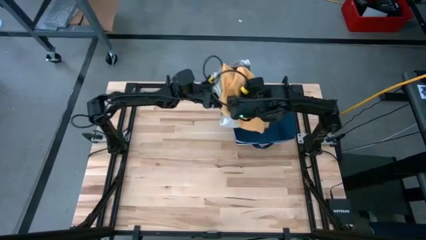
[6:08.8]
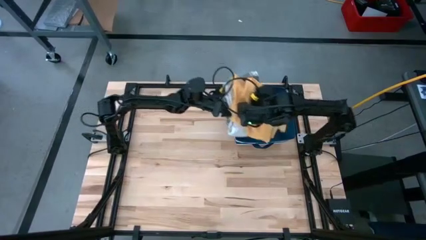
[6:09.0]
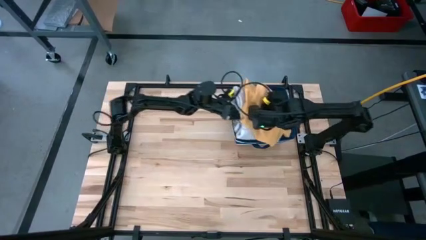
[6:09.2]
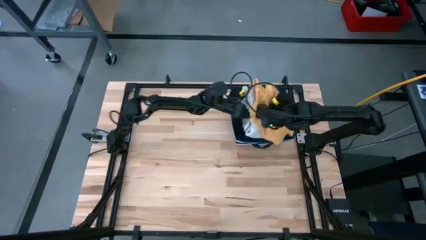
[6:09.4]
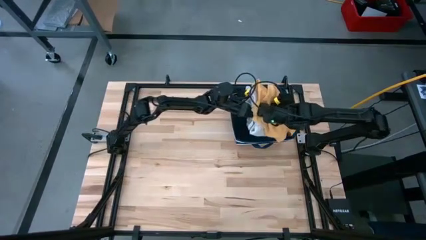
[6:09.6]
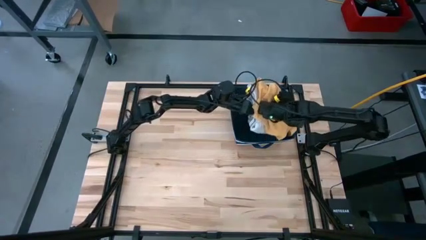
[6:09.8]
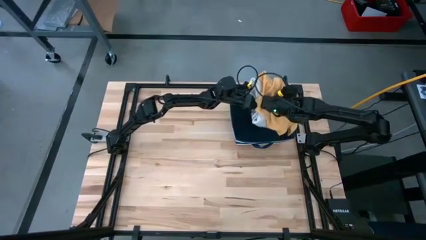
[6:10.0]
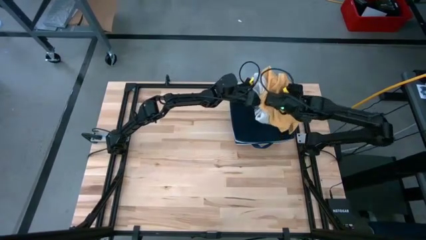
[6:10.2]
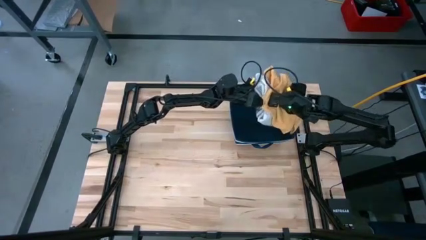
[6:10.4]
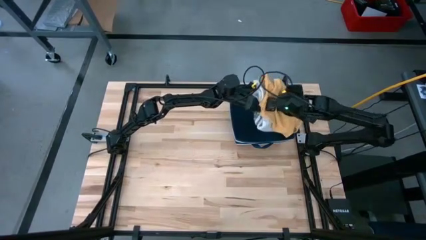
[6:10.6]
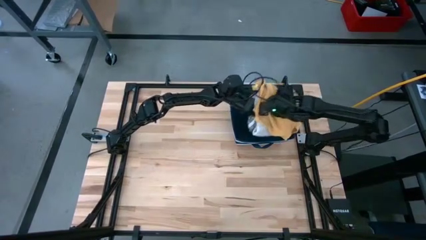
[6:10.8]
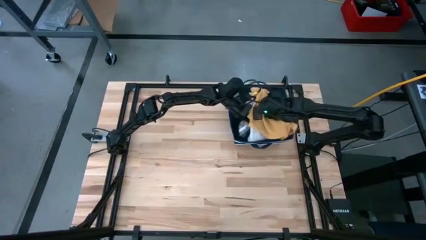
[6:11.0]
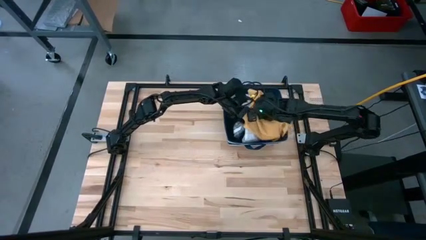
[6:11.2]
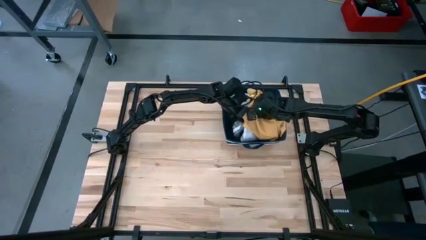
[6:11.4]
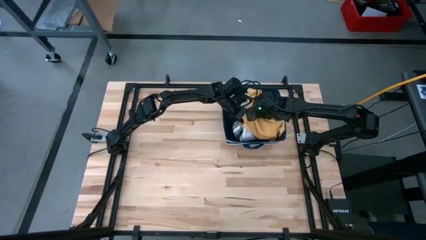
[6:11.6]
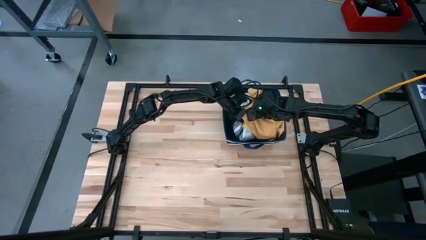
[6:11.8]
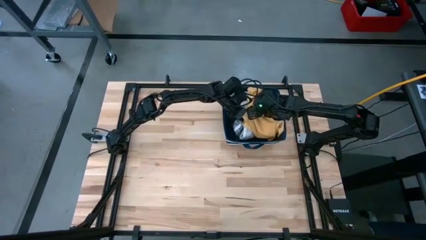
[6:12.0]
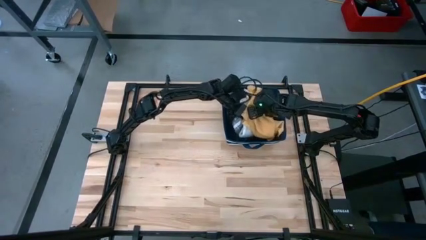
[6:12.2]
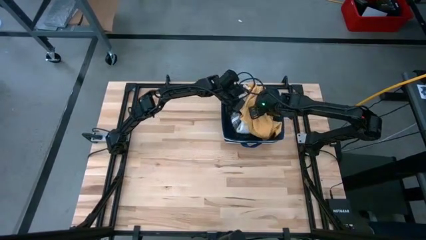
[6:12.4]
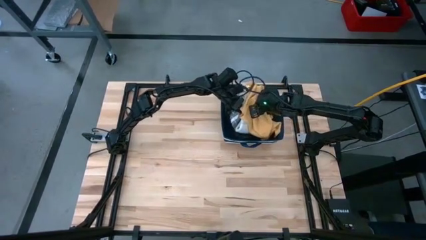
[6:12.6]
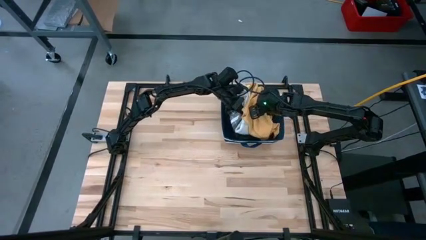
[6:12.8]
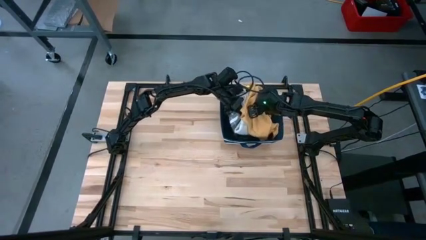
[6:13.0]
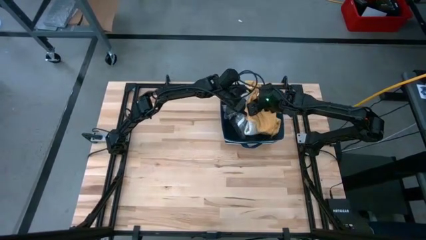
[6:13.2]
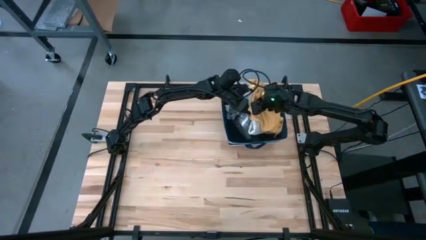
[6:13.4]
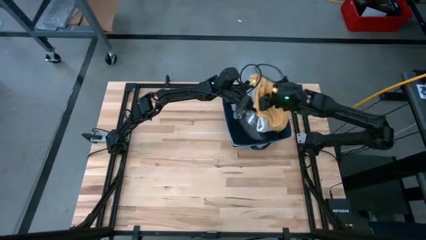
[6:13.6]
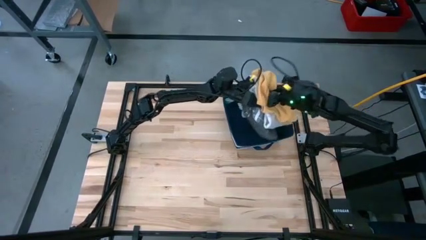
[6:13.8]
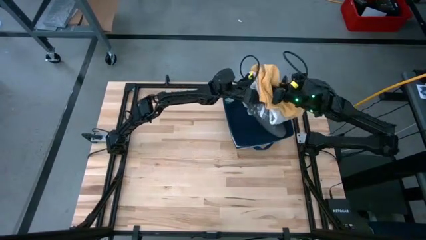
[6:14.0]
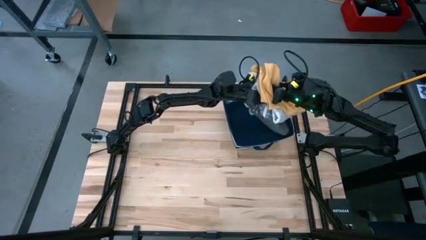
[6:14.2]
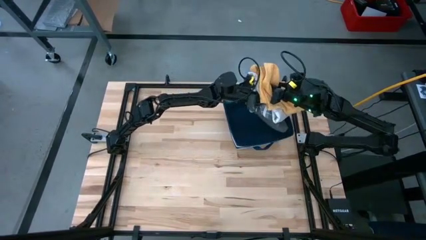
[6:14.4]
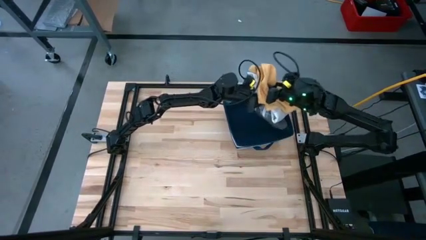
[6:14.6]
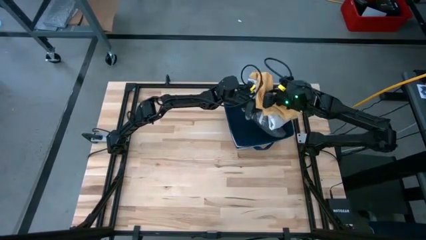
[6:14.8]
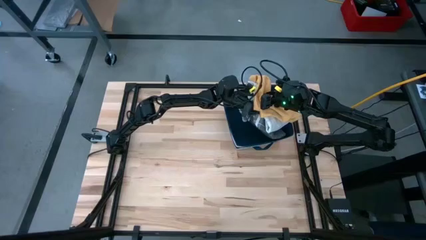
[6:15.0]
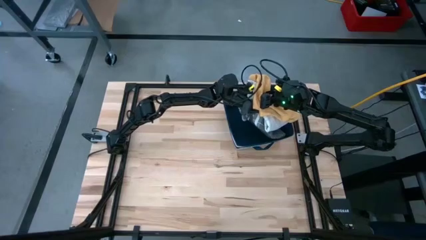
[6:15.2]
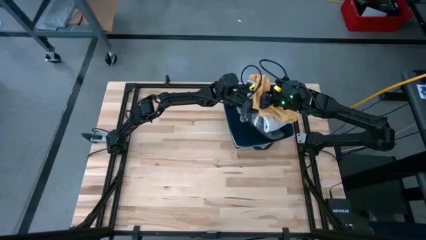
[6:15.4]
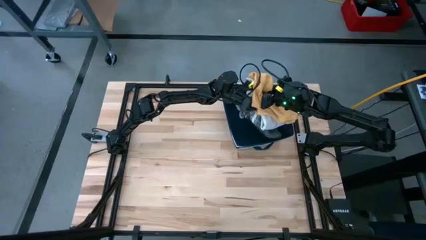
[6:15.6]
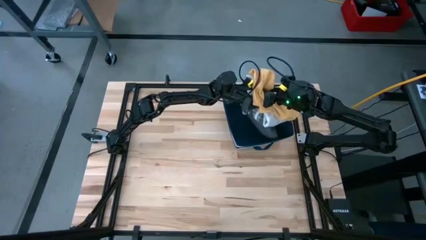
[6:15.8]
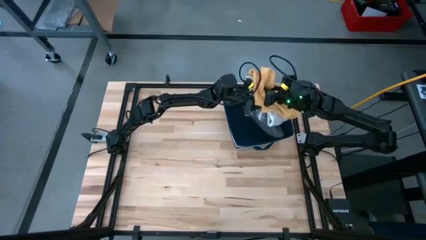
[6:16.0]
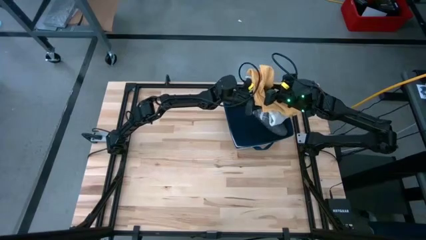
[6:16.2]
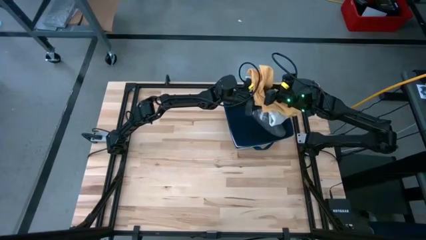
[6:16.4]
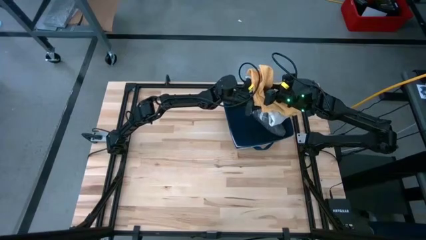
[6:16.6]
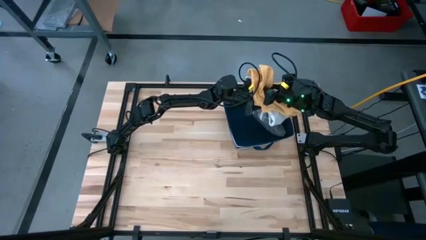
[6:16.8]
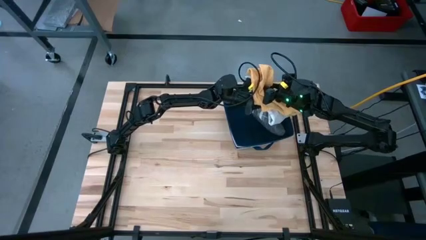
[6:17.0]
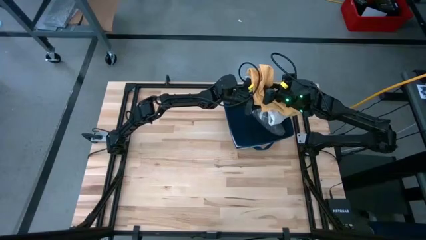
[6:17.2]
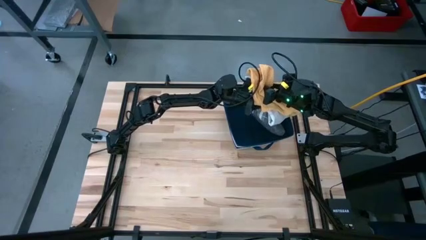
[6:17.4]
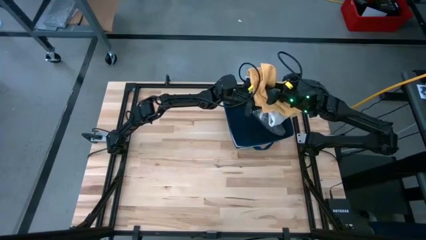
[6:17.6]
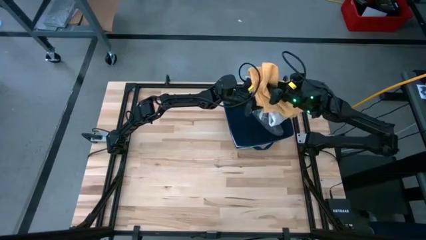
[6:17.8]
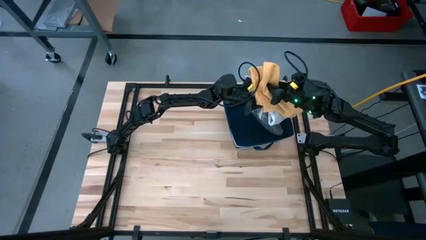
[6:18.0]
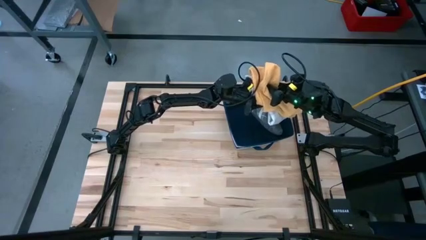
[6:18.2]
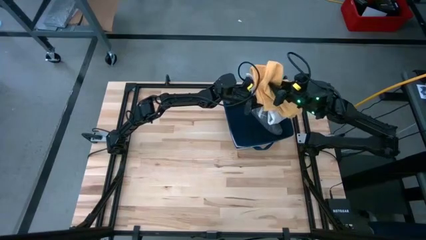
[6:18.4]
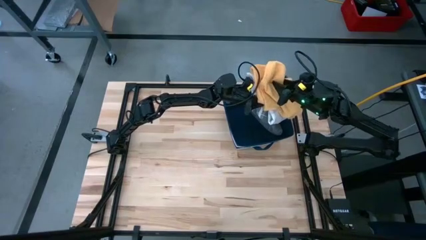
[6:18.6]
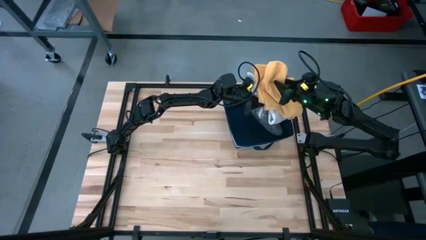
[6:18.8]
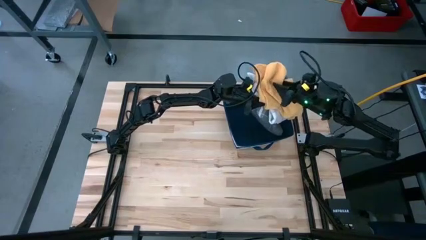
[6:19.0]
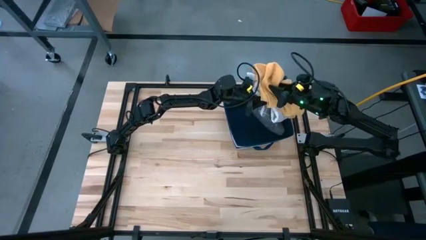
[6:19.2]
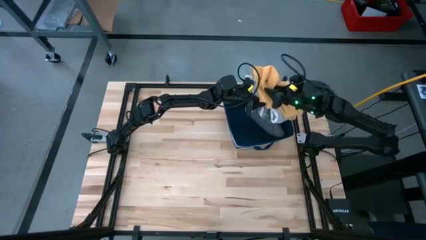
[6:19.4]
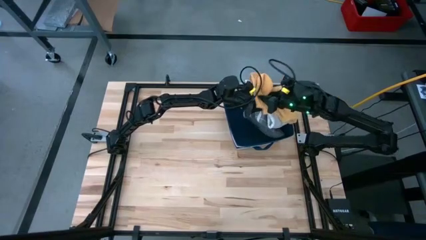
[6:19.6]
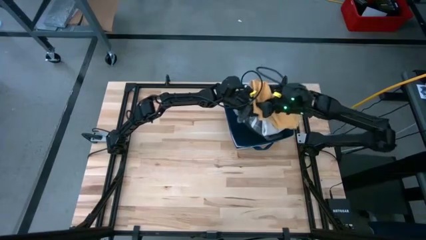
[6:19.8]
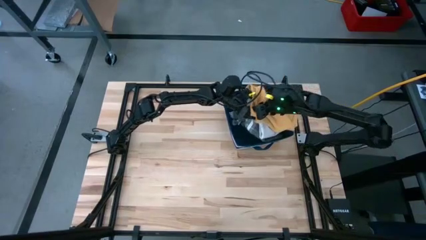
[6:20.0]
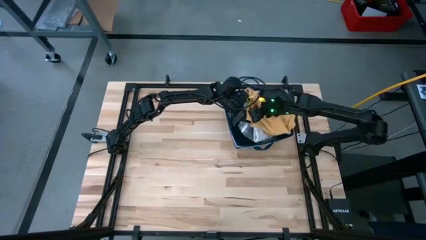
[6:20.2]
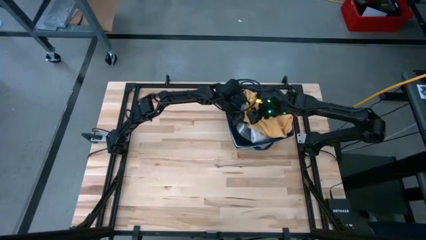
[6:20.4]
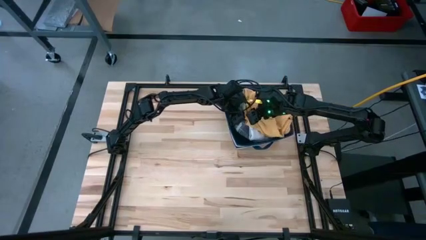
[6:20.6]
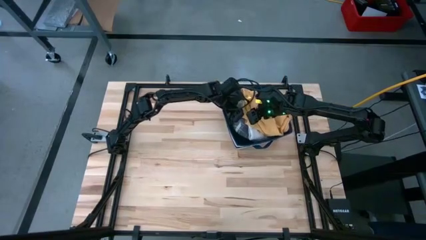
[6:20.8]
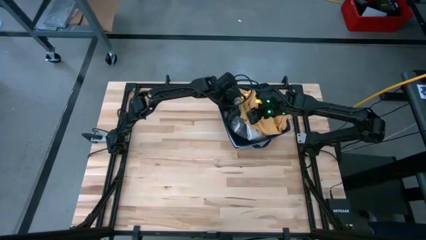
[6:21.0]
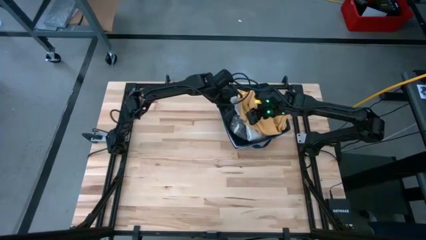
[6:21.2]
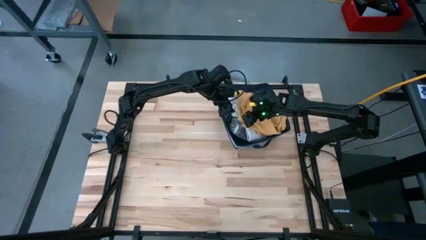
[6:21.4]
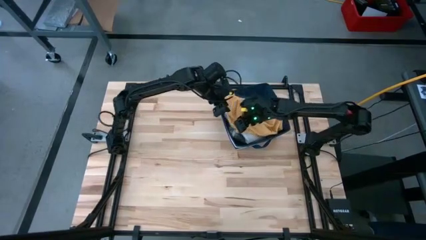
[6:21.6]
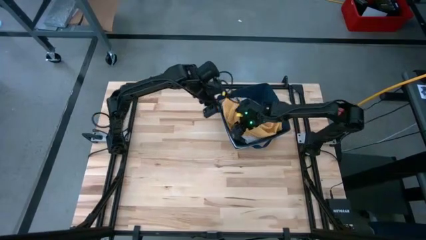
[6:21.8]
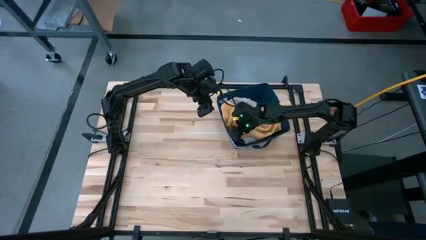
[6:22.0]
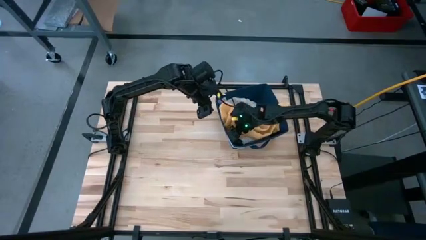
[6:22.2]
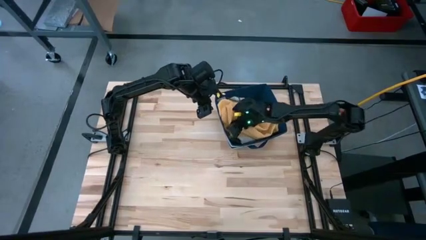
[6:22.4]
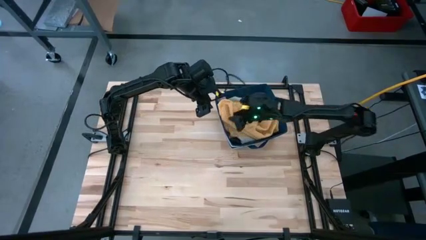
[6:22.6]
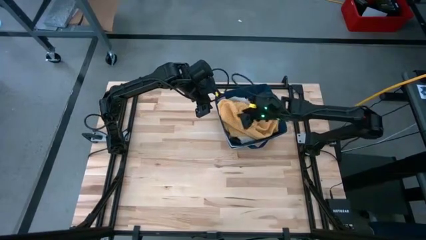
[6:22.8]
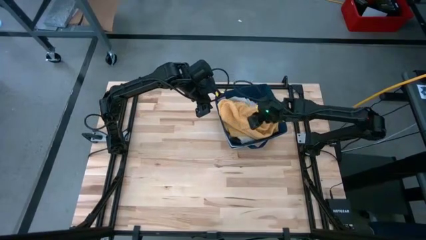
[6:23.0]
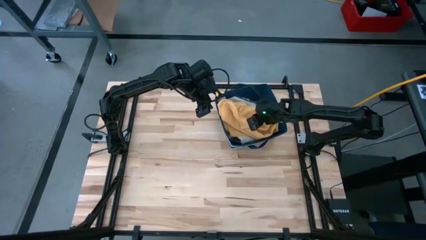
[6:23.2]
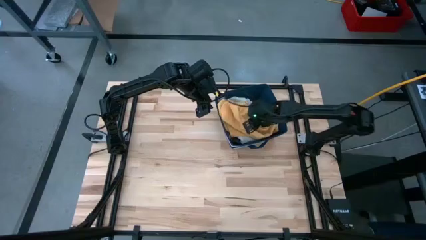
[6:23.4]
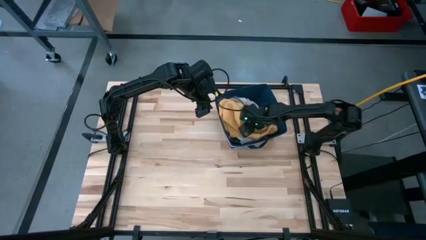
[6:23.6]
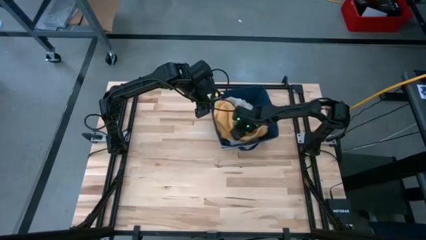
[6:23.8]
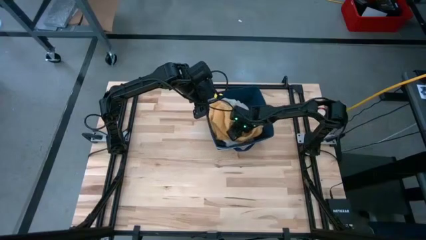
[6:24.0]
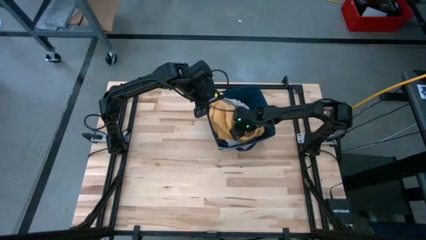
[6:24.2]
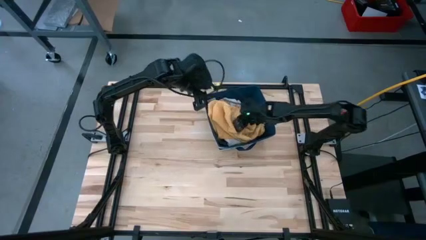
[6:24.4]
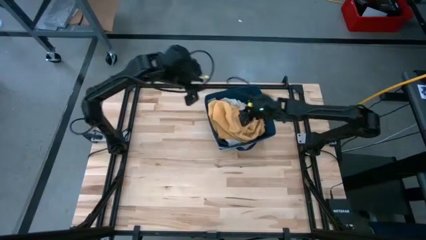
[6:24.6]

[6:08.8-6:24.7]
Task: Fold towel
Put the stacked folded towels into the blue laundry organizer
